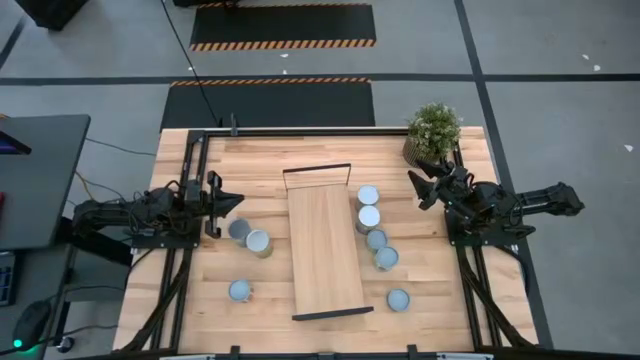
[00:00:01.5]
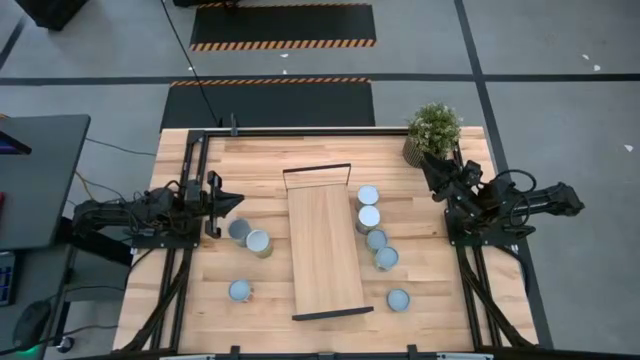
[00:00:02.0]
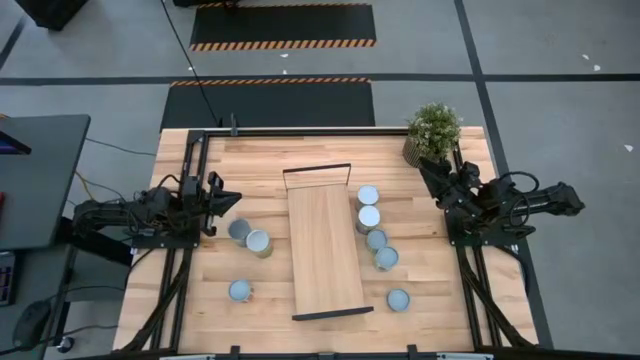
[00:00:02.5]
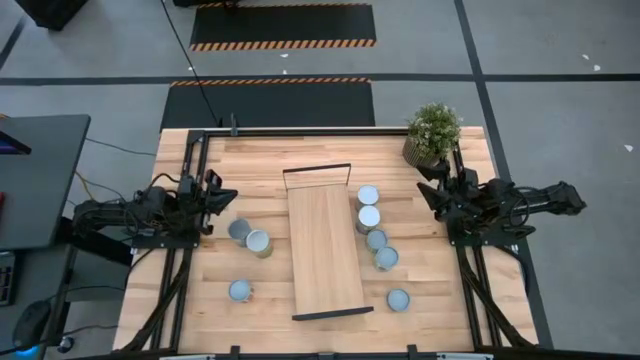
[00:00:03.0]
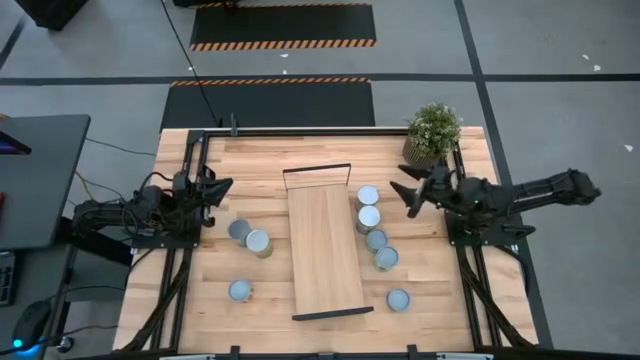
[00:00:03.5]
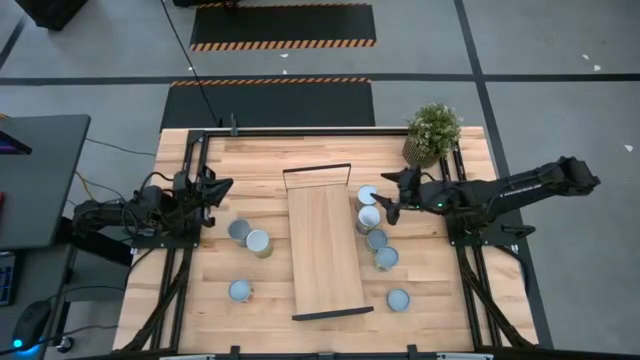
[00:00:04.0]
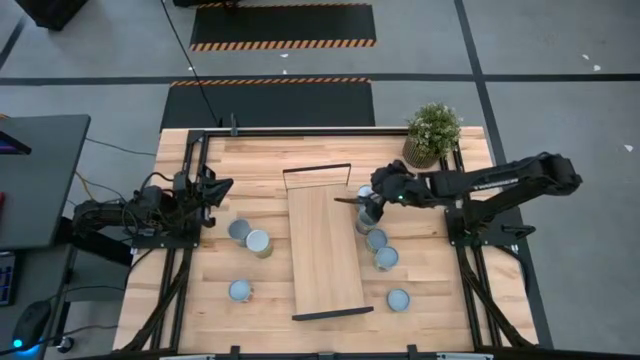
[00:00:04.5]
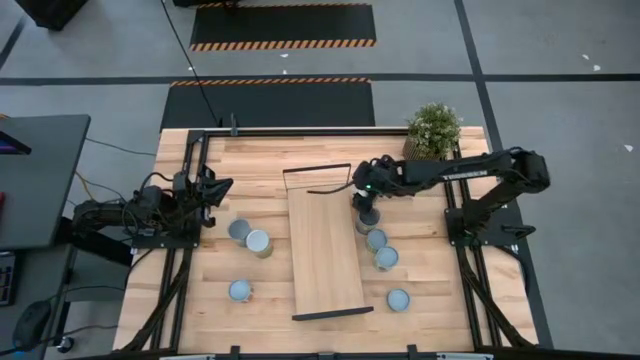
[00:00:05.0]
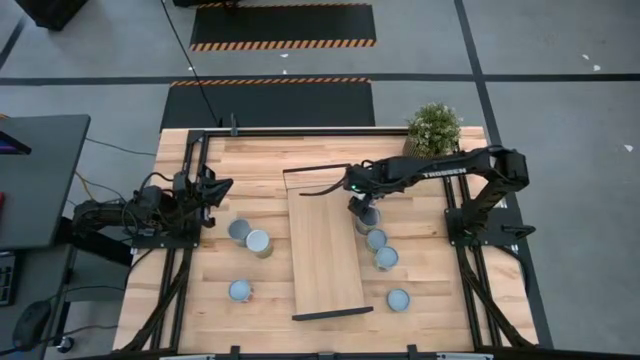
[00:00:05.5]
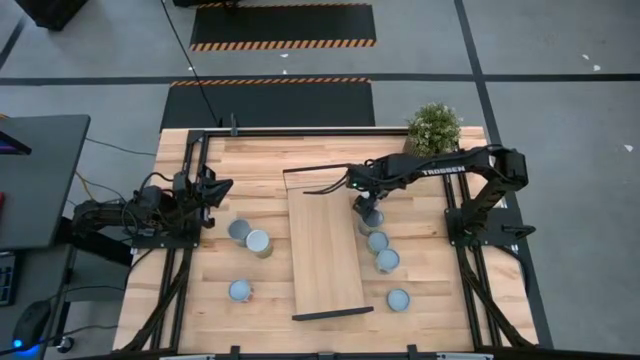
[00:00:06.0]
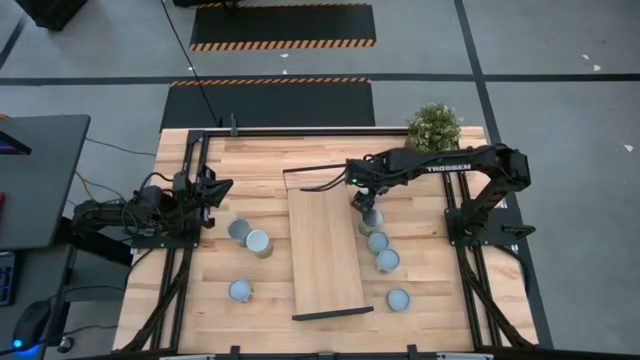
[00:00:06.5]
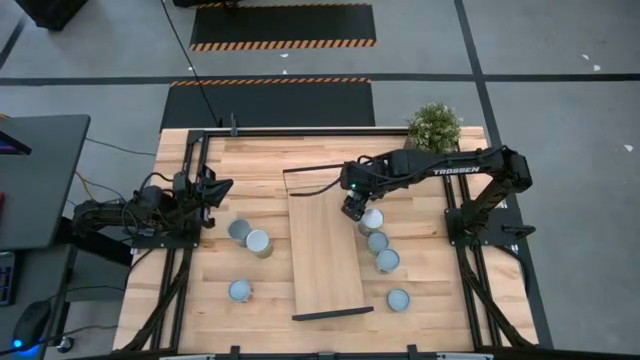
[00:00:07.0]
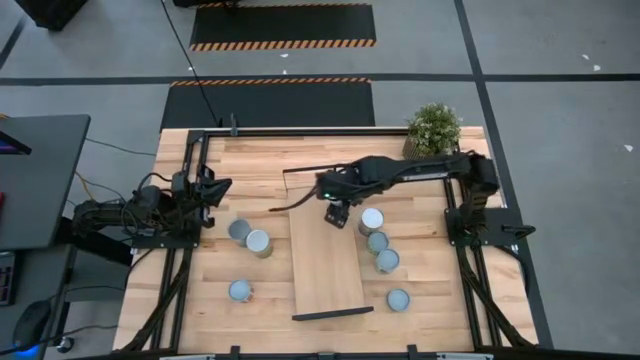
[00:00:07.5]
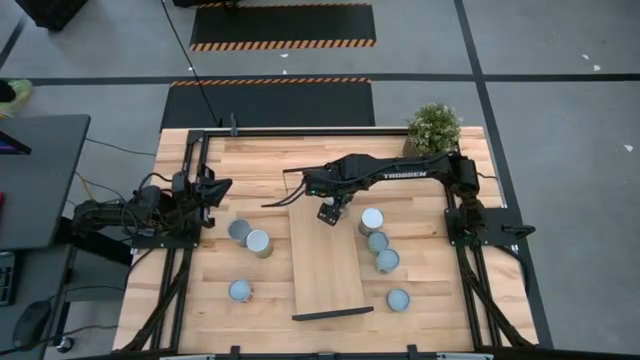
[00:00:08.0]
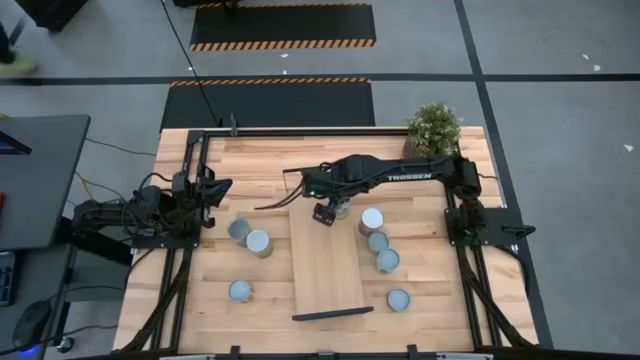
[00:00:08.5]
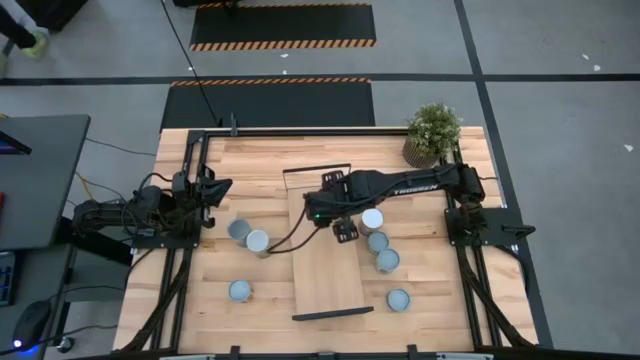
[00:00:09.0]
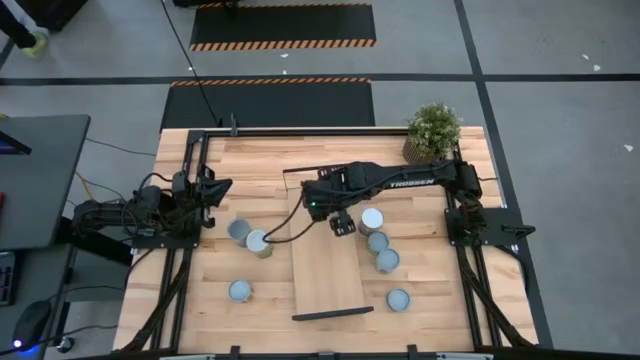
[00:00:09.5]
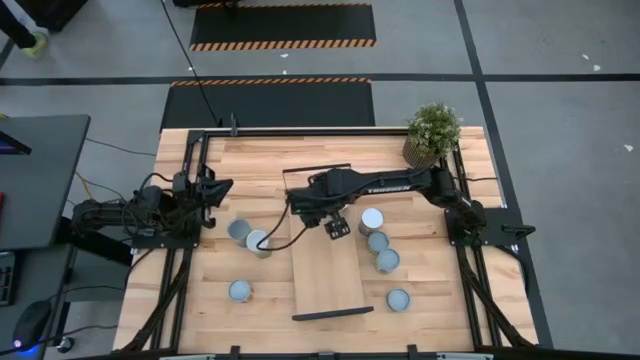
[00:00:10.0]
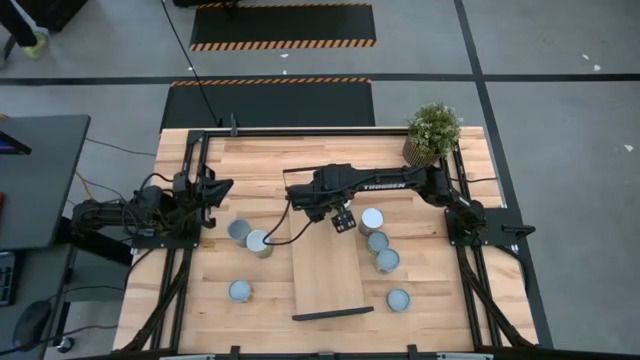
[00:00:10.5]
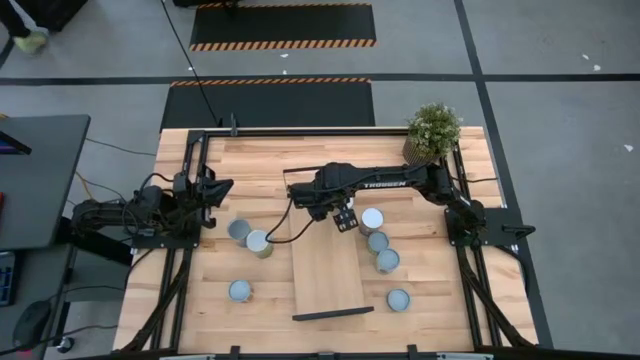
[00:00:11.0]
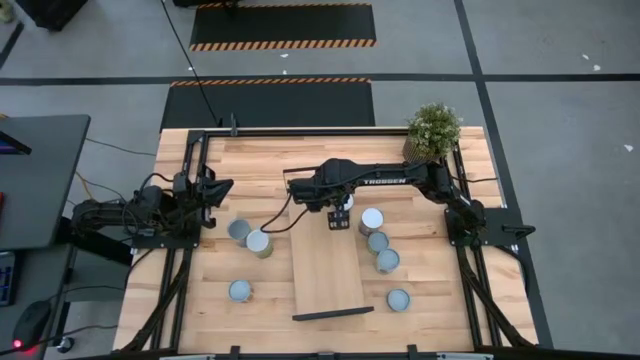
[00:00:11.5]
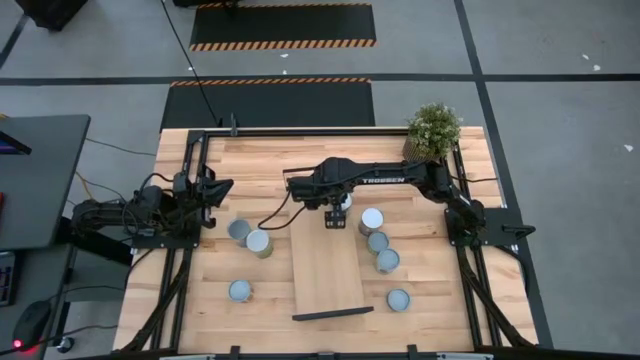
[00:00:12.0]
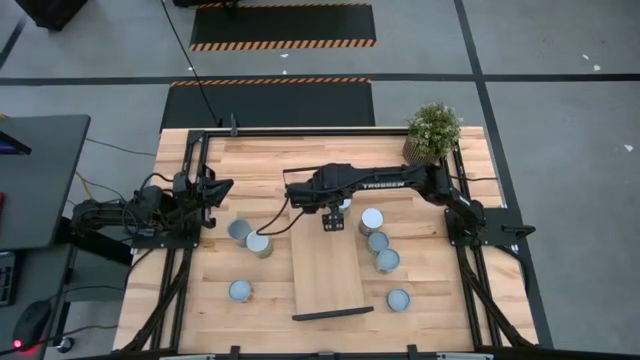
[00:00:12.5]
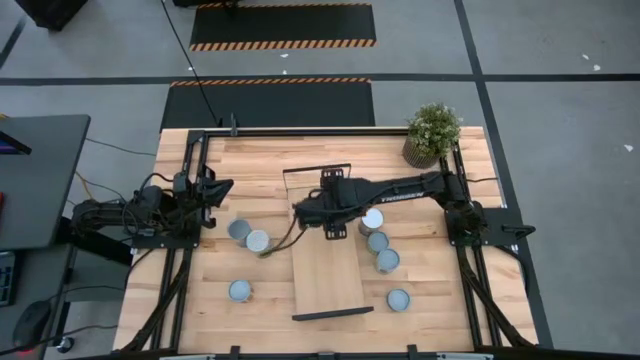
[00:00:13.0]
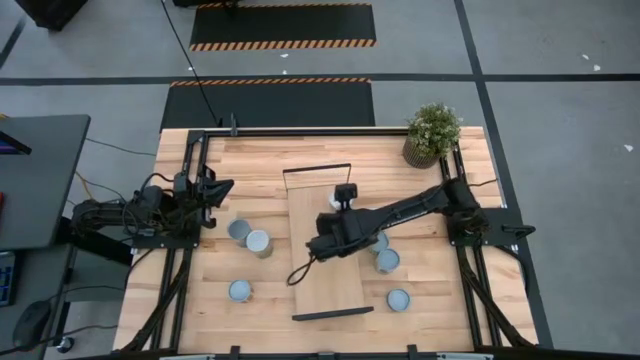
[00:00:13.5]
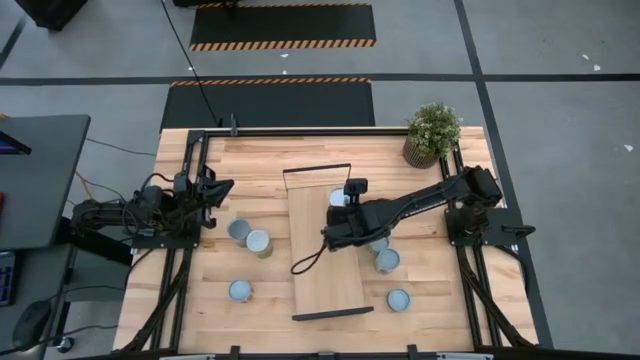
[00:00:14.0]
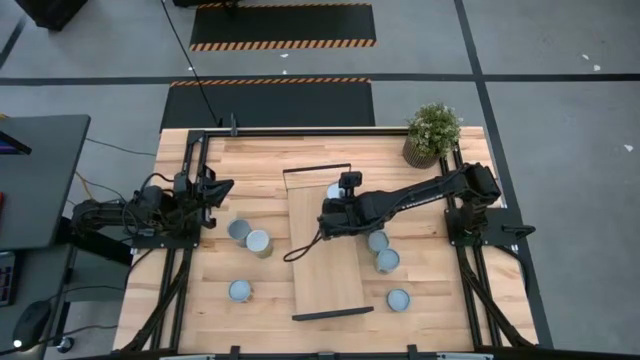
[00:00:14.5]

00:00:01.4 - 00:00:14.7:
Task: Pick and place cans onto a shelf
Put the canned carrots on the shelf

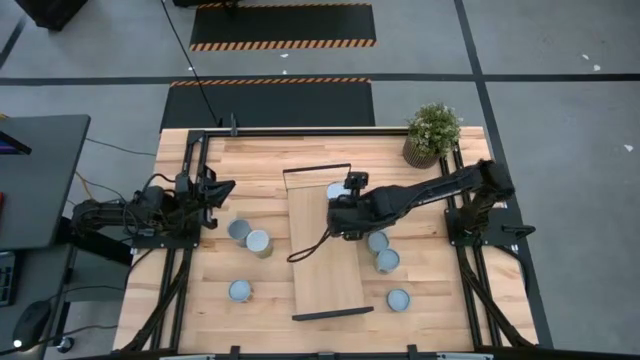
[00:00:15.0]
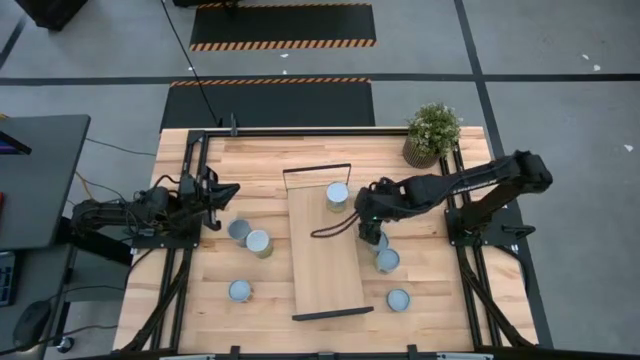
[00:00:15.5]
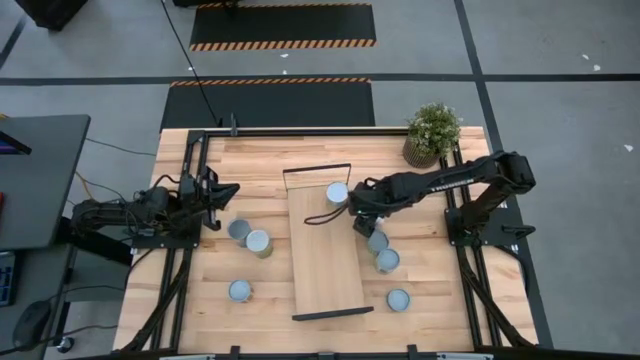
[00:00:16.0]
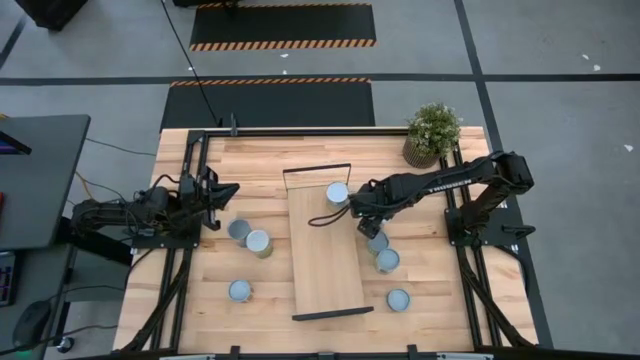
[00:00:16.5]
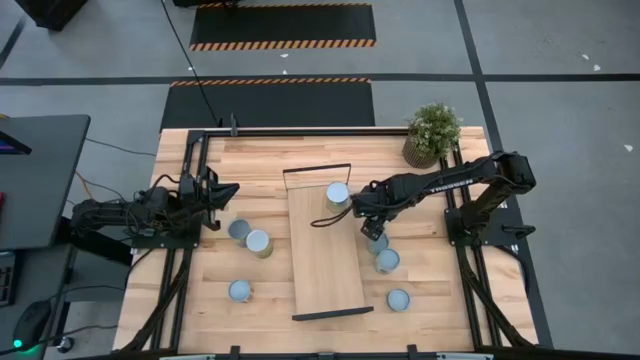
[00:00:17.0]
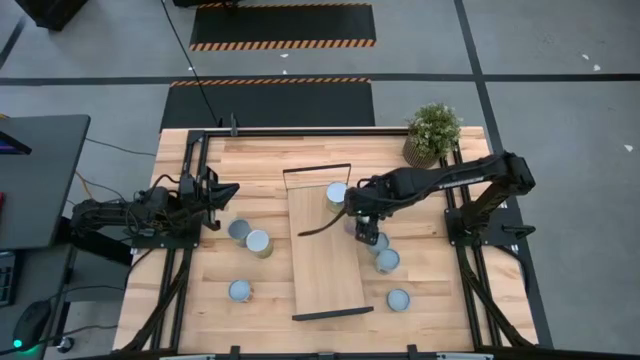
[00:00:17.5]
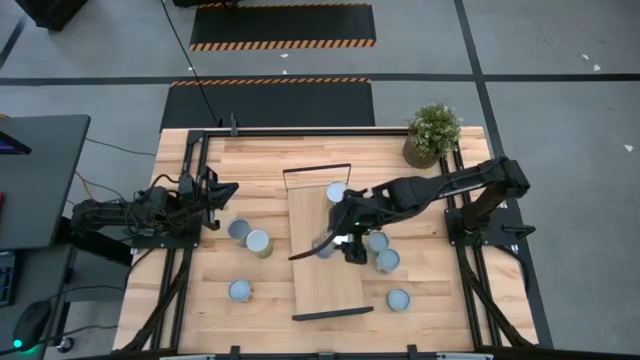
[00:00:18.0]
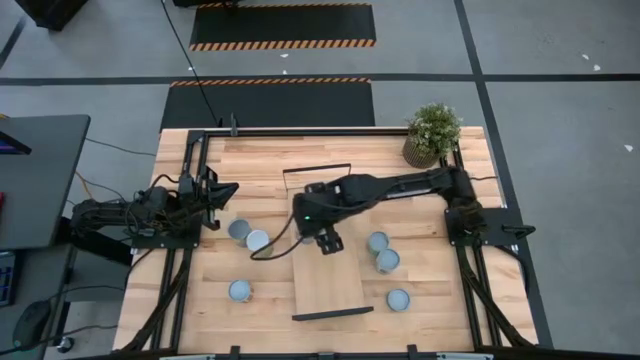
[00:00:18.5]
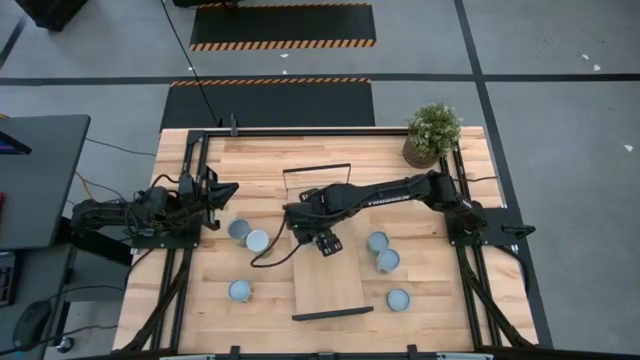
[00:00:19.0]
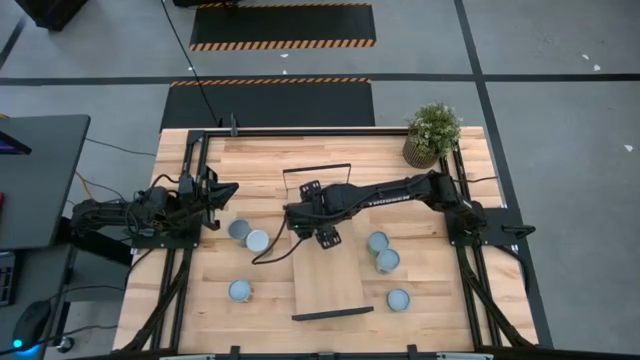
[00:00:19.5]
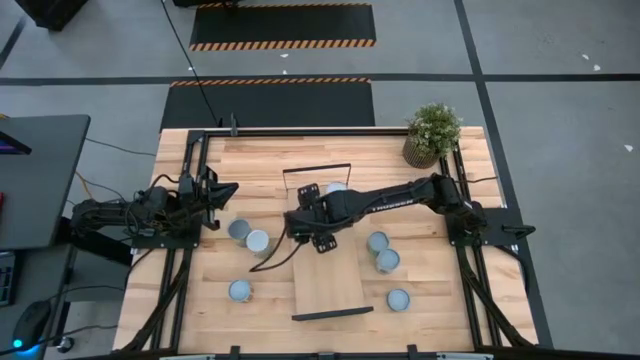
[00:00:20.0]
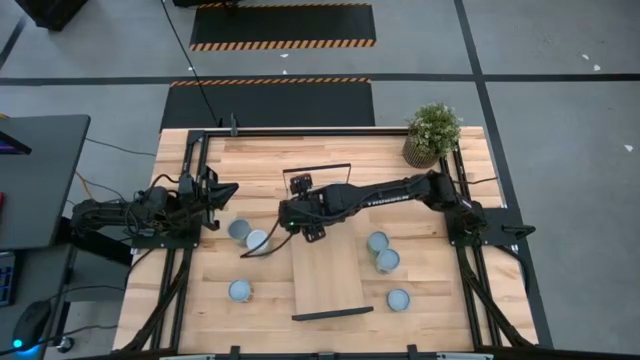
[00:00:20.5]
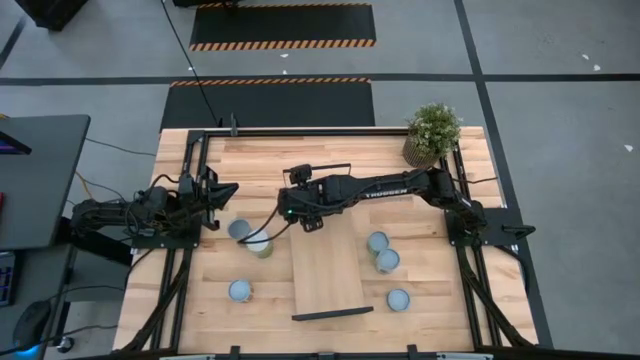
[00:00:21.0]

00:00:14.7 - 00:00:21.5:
Put the canned peaches on the shelf
